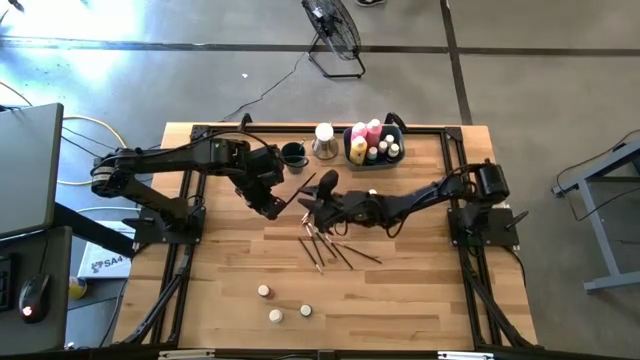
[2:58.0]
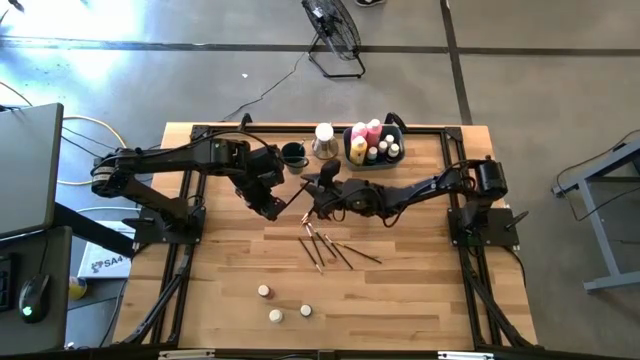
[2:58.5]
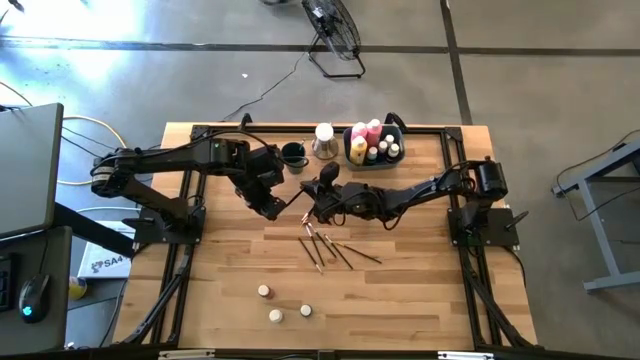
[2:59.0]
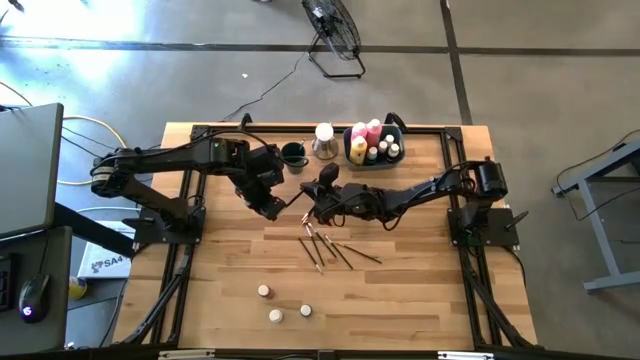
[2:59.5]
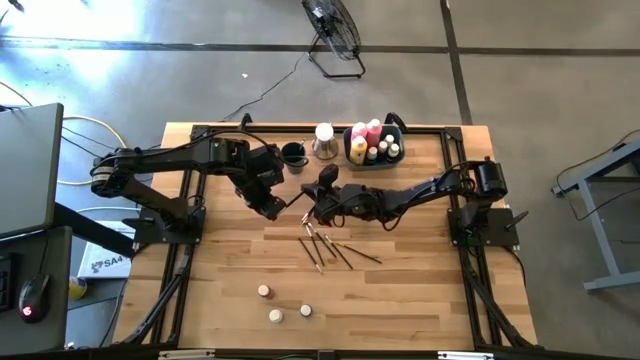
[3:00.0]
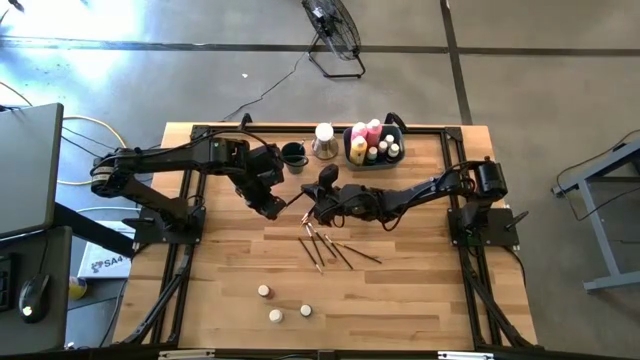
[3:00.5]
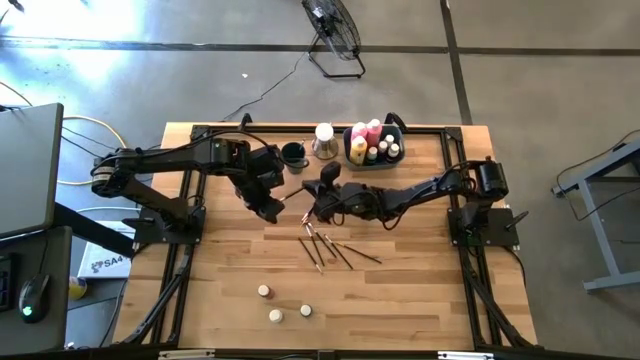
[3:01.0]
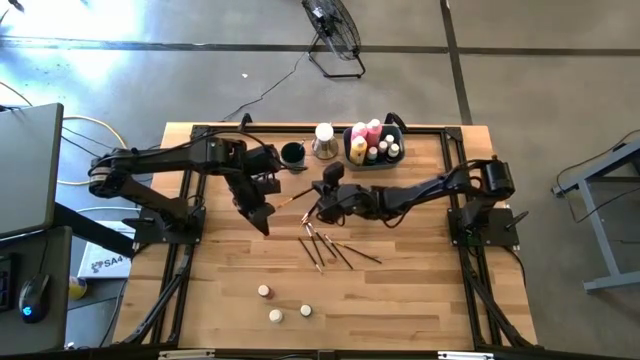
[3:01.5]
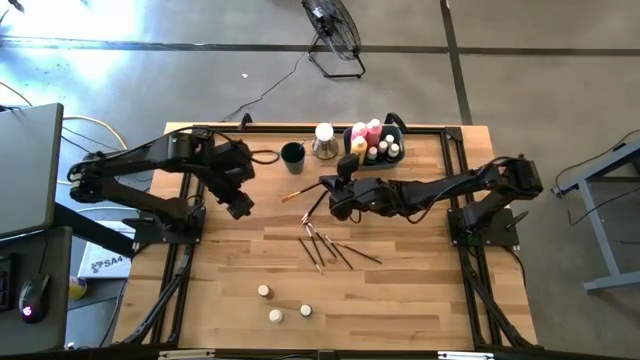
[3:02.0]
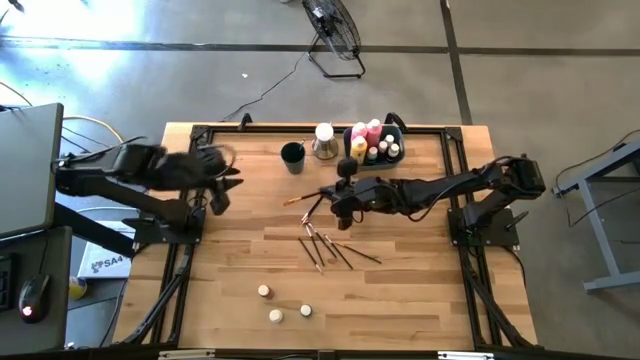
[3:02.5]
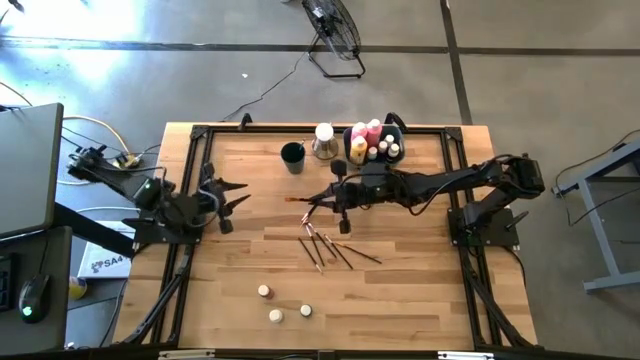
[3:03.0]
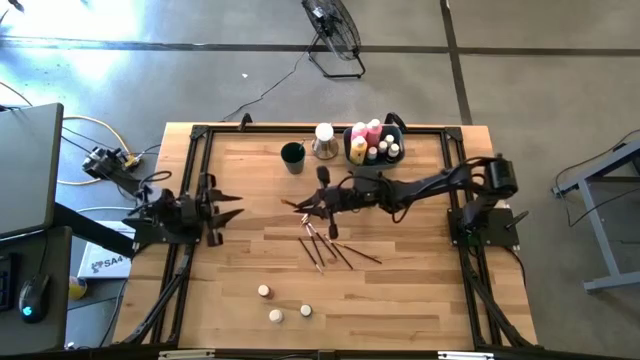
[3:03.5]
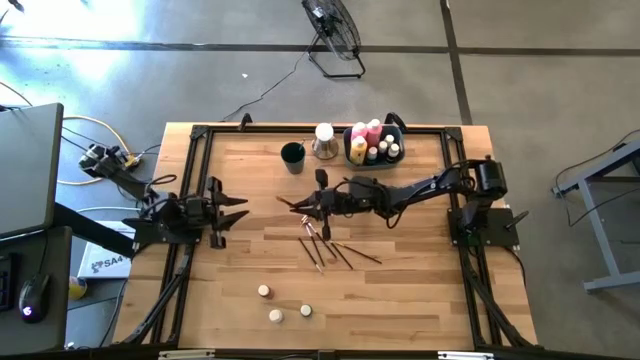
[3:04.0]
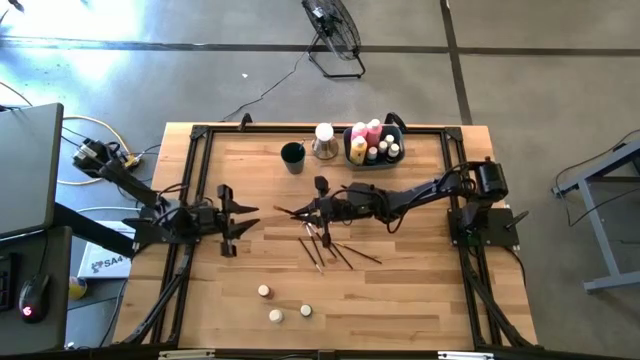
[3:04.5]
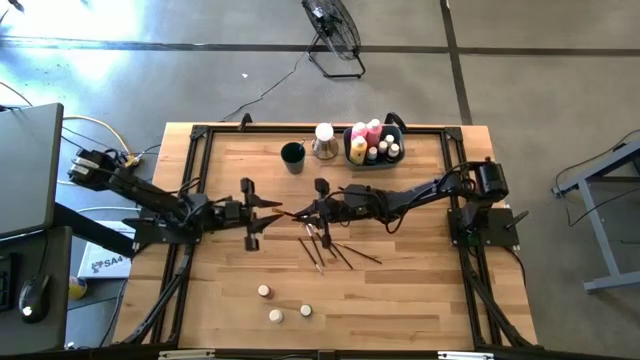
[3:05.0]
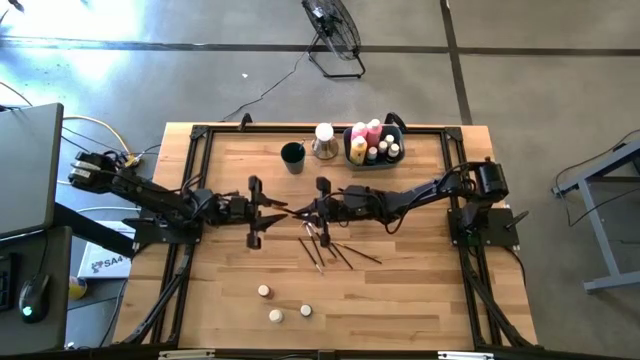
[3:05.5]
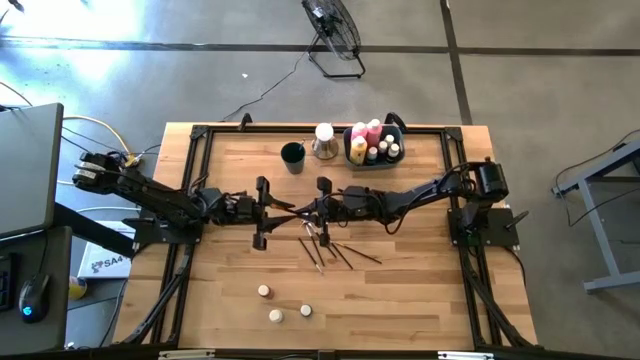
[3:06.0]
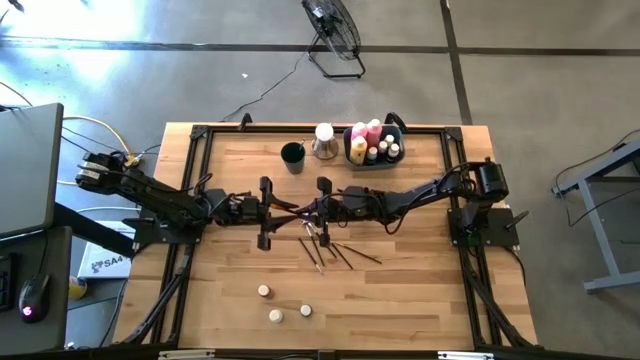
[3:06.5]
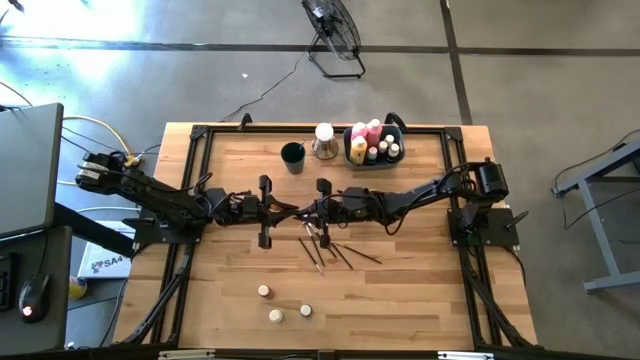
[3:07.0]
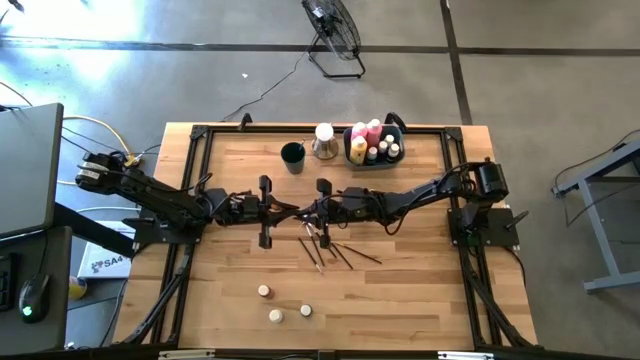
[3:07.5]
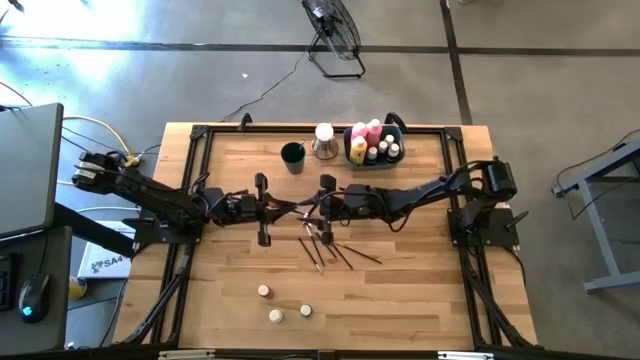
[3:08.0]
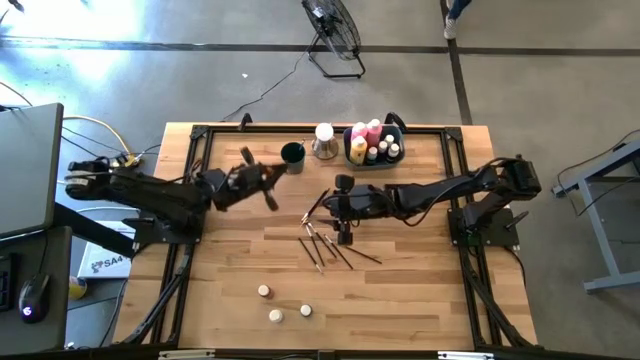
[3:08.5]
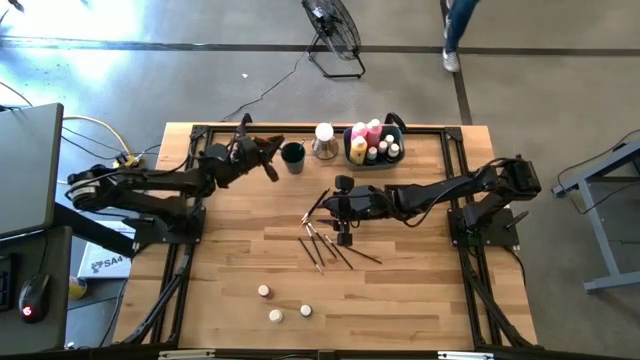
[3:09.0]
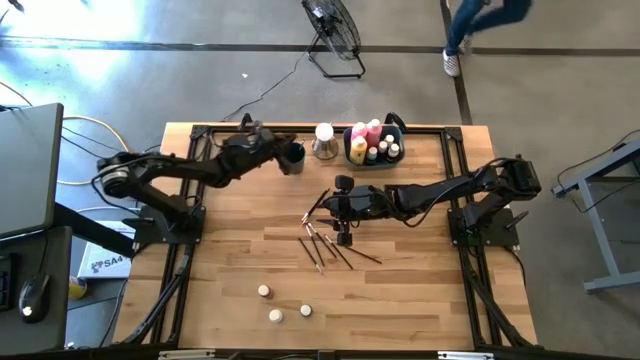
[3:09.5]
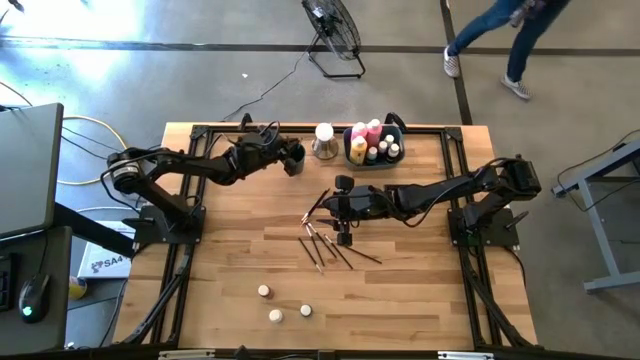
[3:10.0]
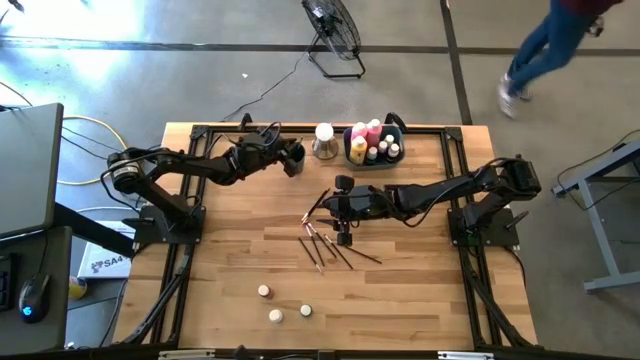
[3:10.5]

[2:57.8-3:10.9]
Task: Pick & Place Paint Supplies
Put the gold paintbrush into the blue cup
